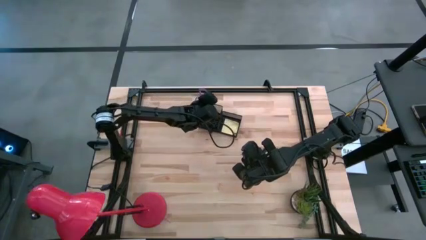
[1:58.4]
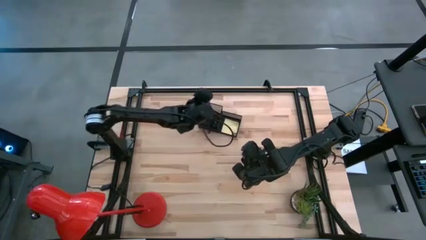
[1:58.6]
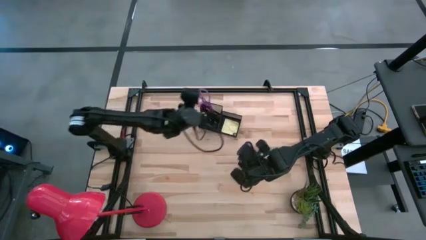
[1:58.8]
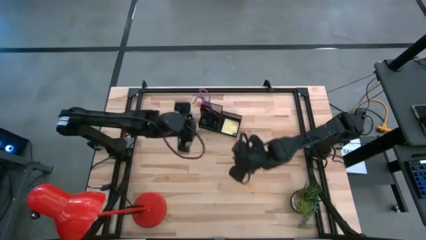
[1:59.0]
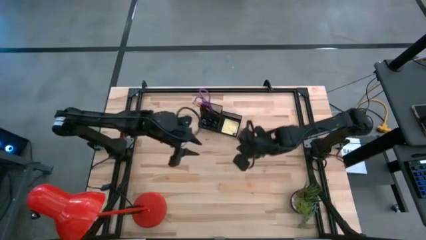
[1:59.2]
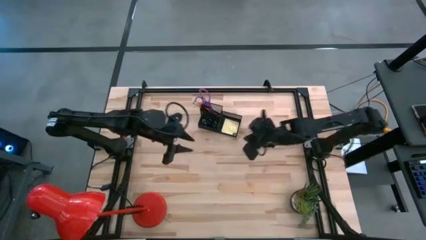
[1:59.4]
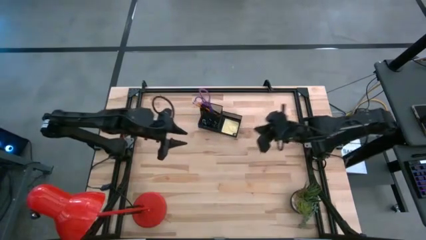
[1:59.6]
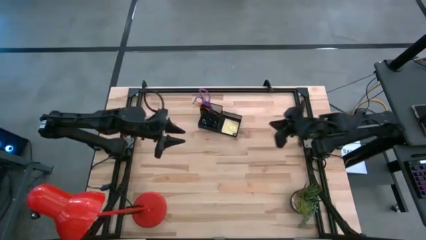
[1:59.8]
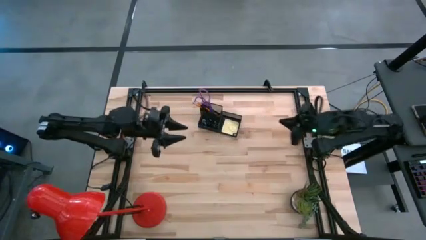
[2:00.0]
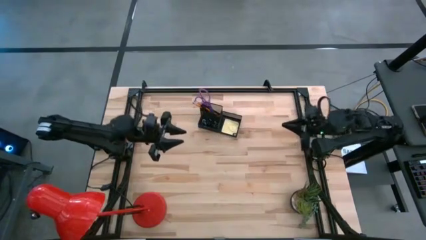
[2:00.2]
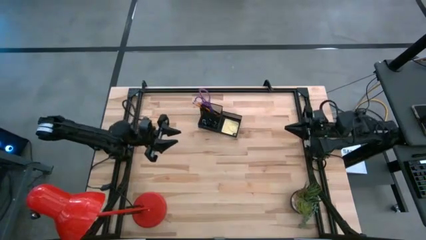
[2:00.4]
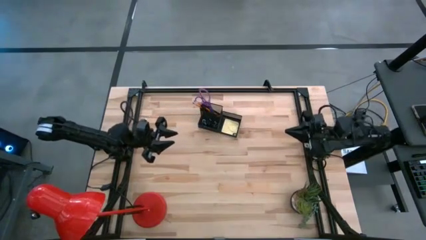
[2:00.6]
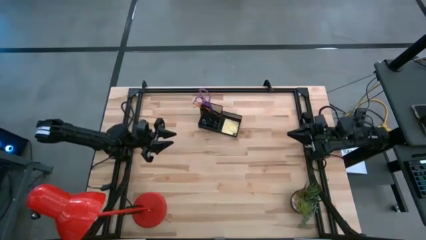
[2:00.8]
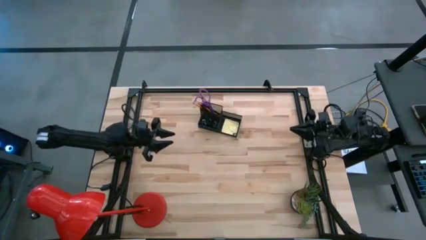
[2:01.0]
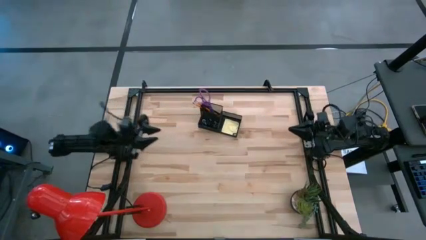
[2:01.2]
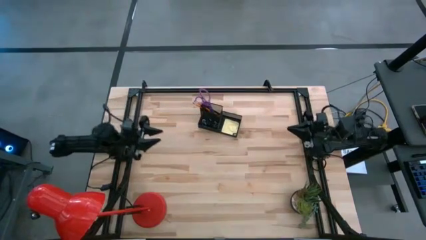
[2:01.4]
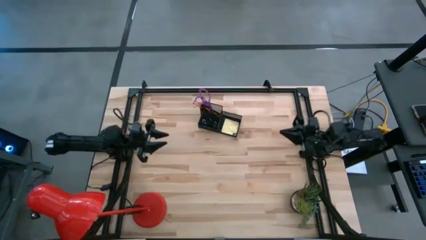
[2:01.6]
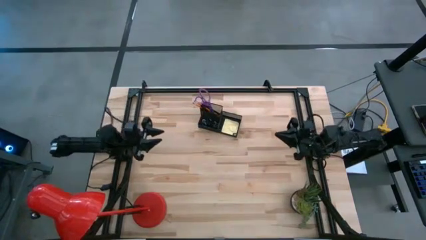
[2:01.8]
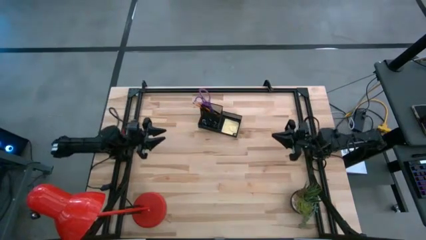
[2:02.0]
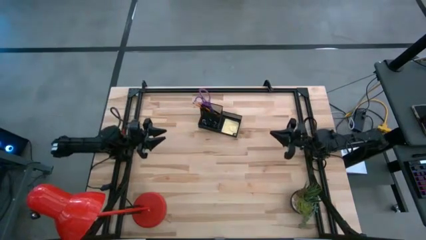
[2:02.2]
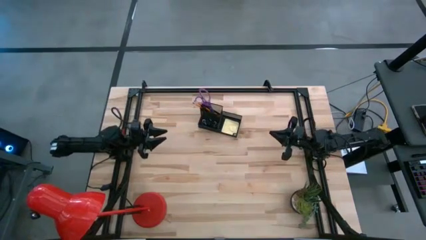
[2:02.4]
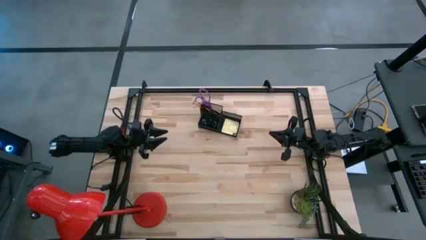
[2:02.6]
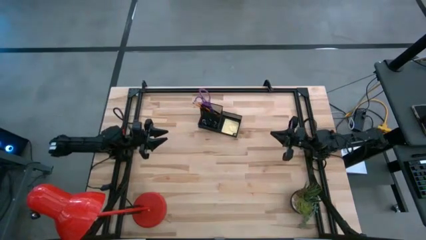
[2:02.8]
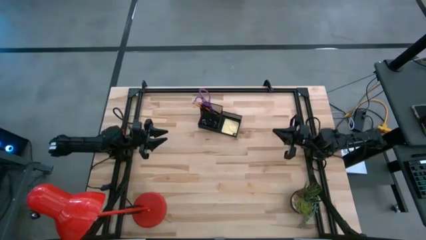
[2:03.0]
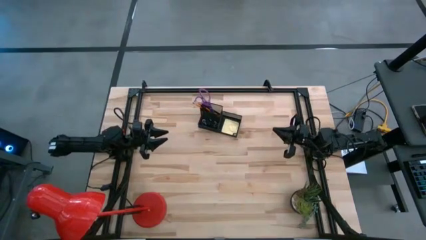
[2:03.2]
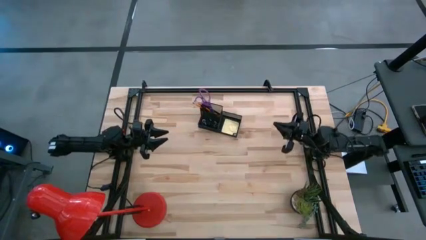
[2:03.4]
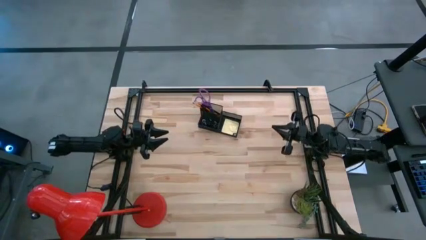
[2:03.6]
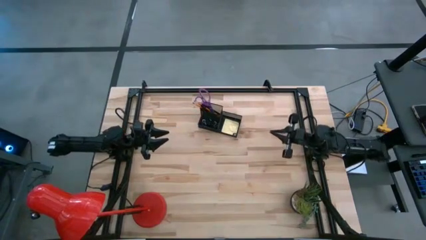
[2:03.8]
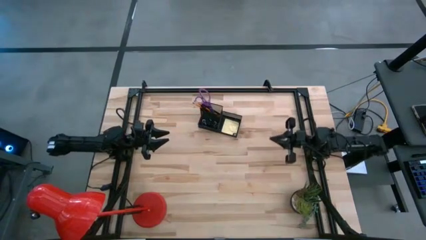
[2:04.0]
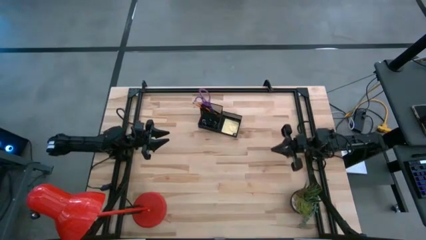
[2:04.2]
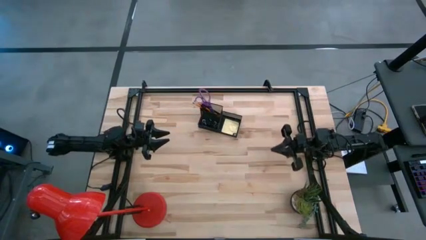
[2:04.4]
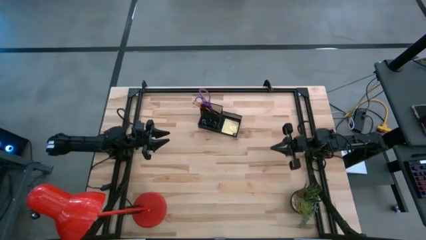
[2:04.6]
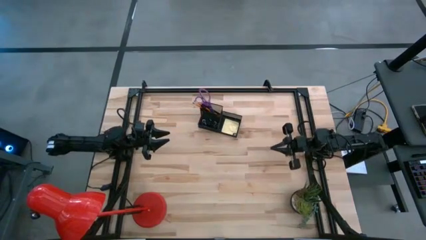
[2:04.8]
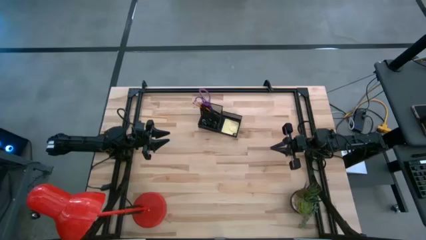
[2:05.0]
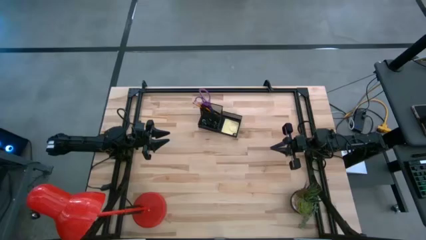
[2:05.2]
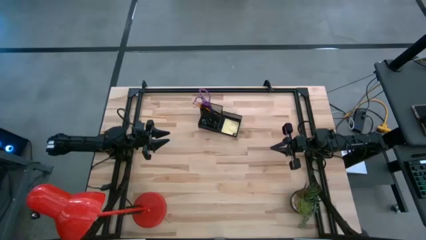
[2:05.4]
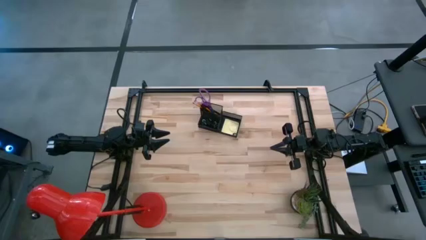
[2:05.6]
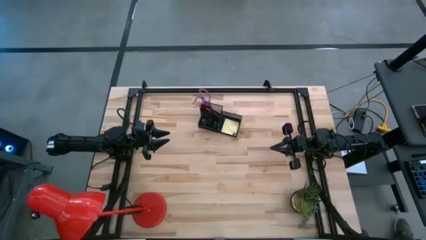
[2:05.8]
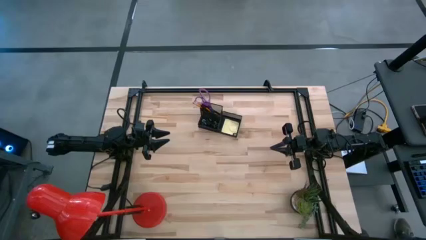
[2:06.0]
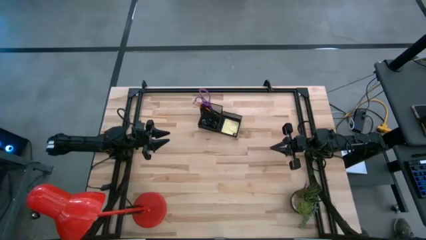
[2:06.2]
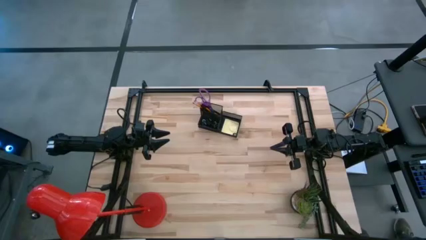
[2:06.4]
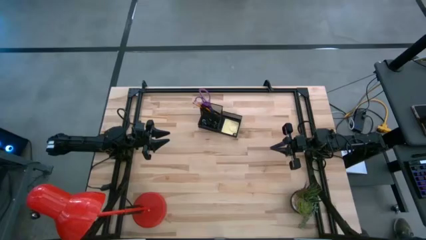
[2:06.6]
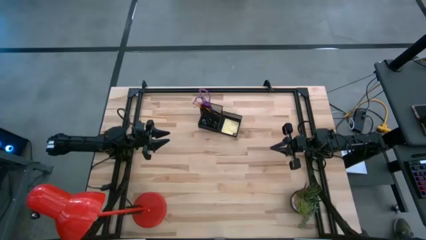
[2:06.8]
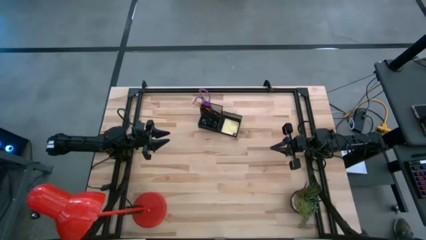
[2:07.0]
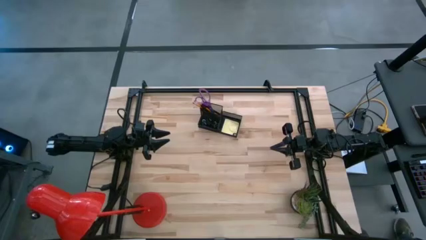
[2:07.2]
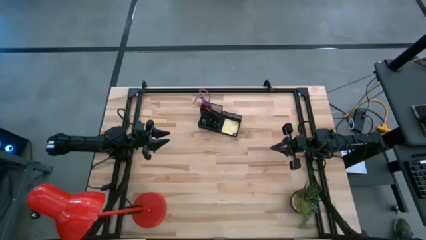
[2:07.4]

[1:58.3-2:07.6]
Task: Pick and place office supplies into organizer
Return to Home Position

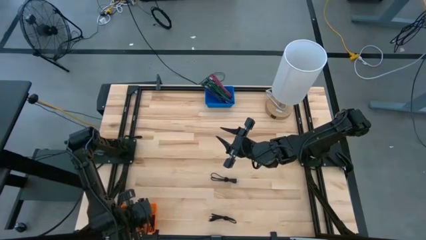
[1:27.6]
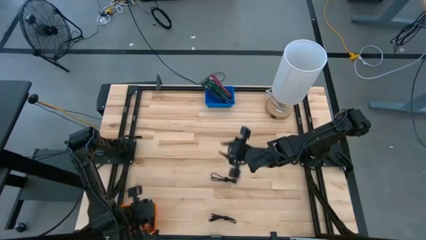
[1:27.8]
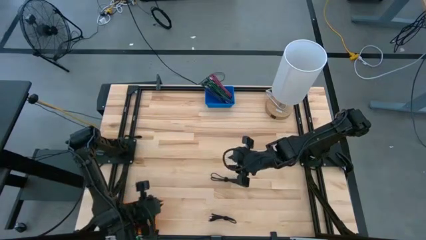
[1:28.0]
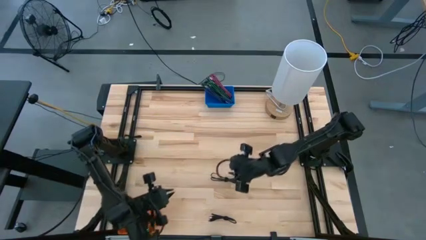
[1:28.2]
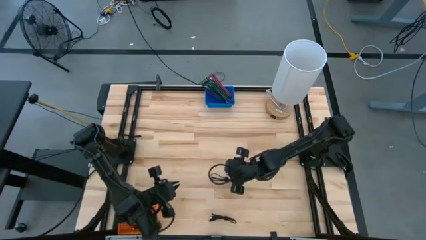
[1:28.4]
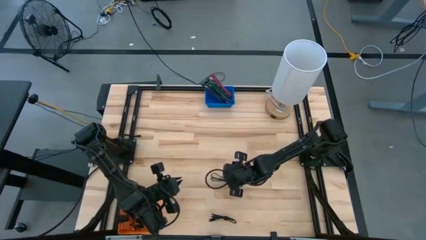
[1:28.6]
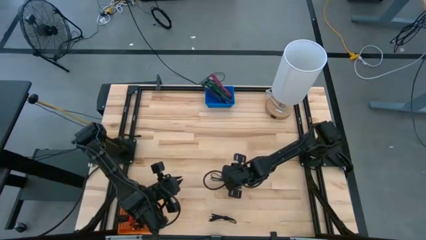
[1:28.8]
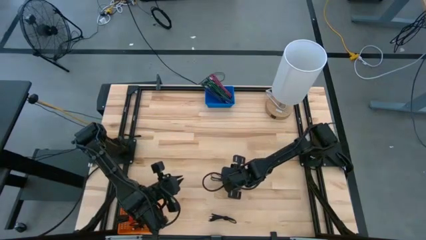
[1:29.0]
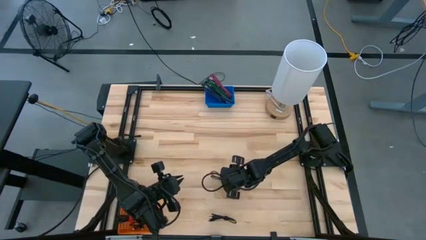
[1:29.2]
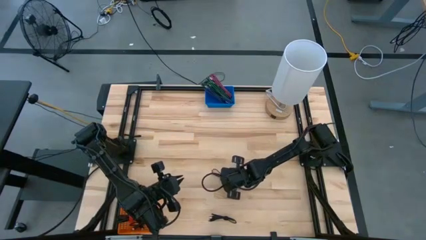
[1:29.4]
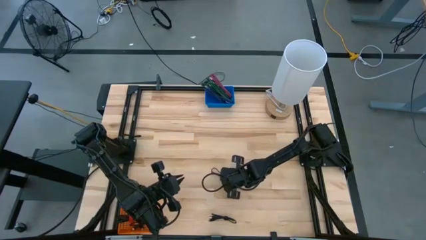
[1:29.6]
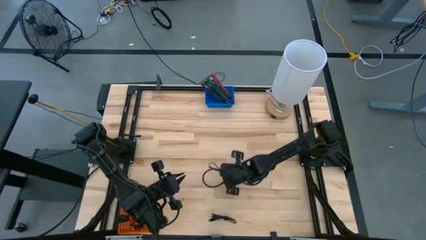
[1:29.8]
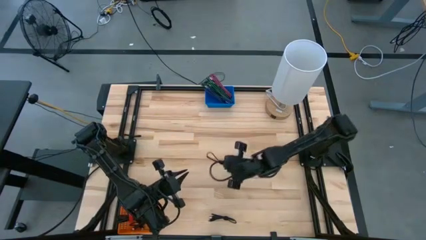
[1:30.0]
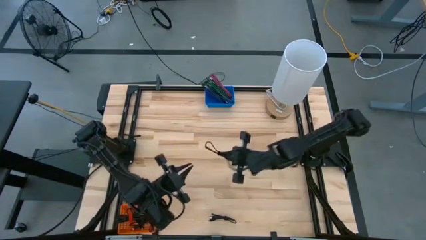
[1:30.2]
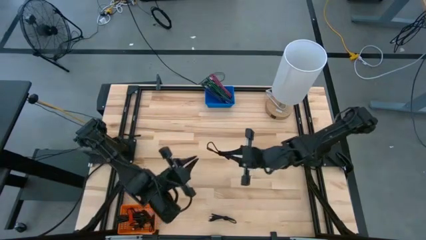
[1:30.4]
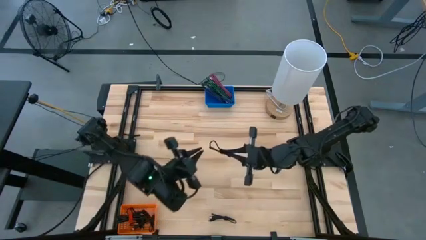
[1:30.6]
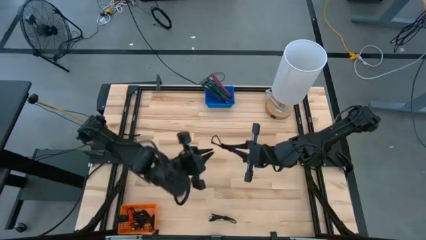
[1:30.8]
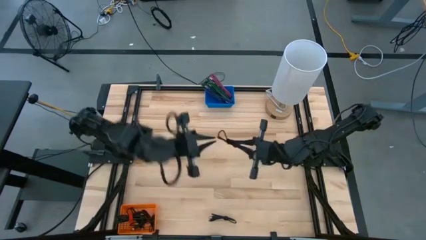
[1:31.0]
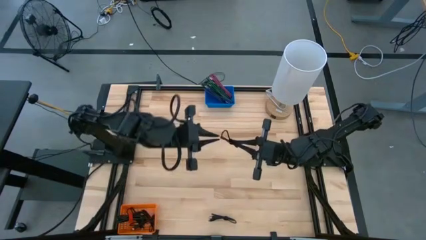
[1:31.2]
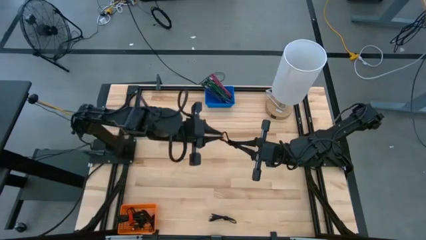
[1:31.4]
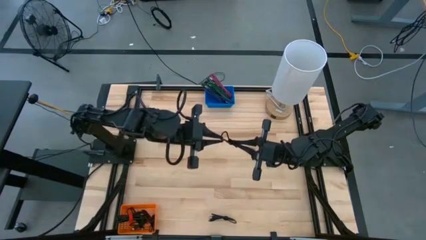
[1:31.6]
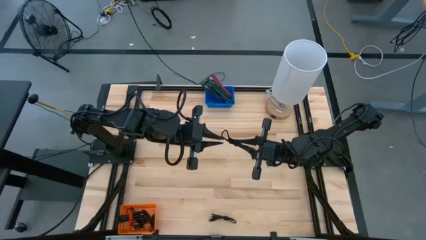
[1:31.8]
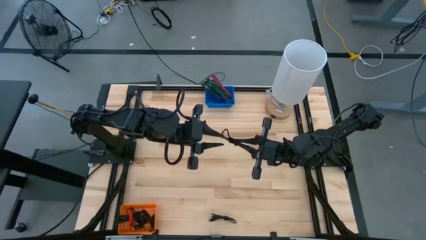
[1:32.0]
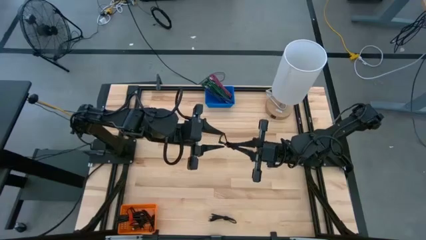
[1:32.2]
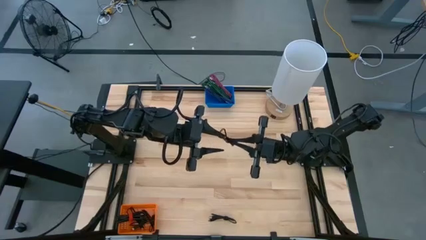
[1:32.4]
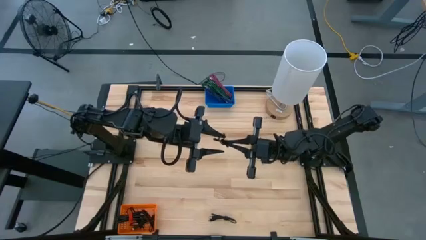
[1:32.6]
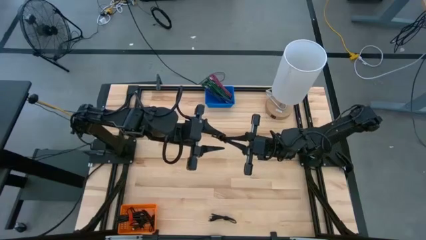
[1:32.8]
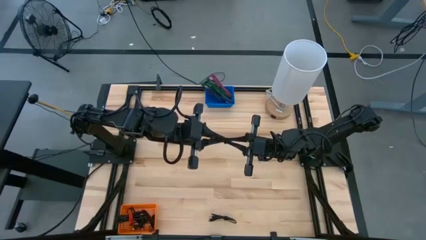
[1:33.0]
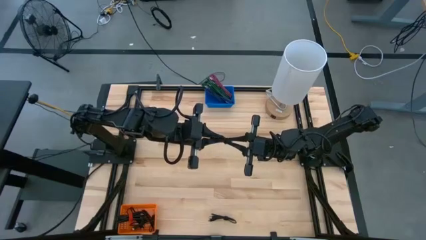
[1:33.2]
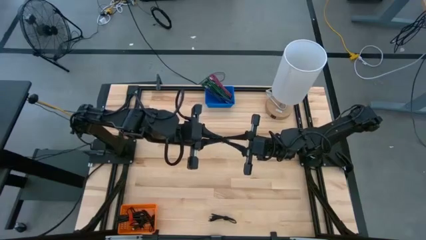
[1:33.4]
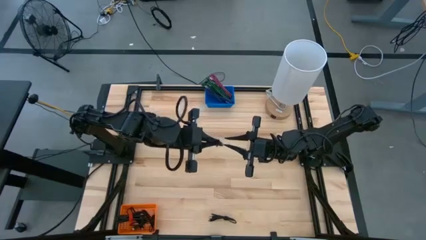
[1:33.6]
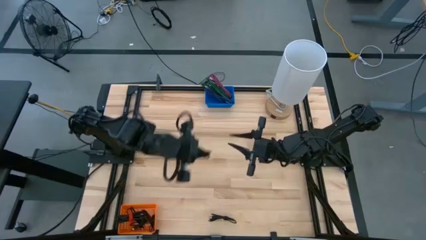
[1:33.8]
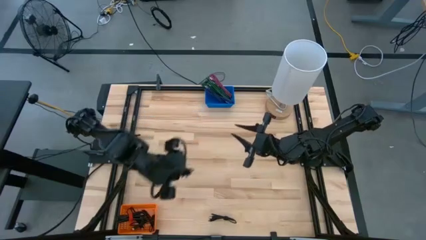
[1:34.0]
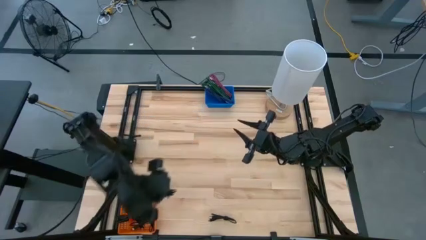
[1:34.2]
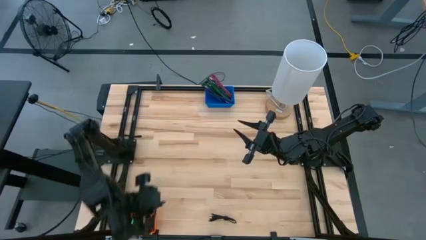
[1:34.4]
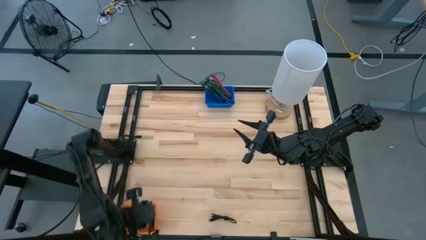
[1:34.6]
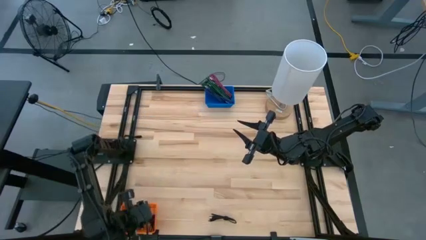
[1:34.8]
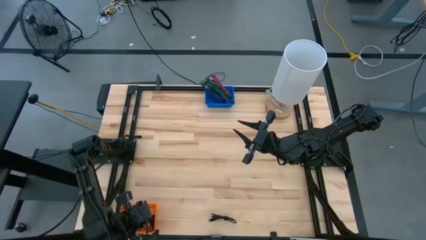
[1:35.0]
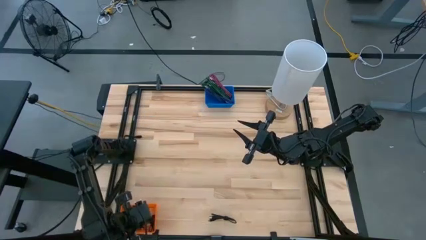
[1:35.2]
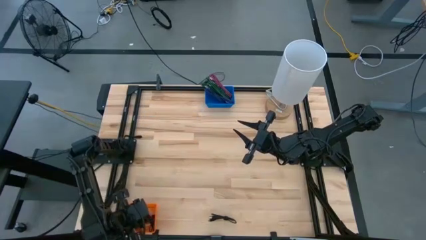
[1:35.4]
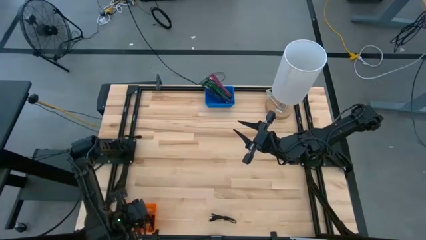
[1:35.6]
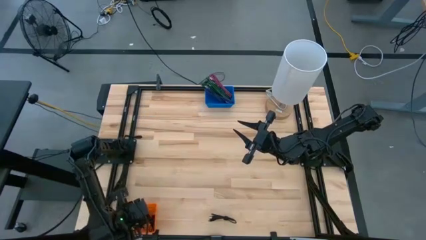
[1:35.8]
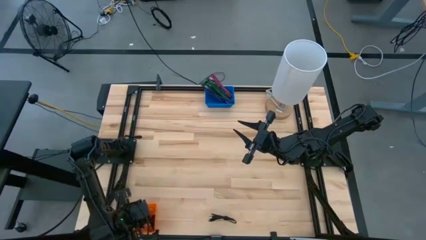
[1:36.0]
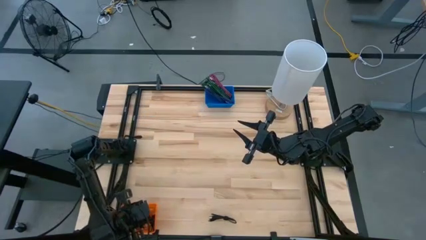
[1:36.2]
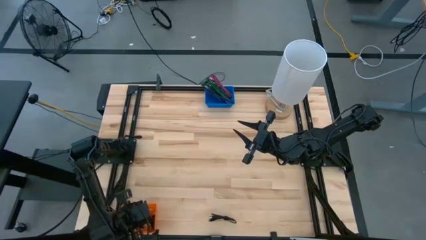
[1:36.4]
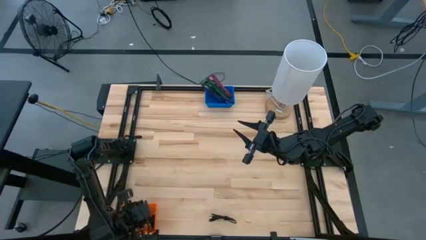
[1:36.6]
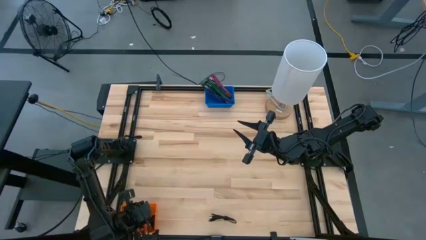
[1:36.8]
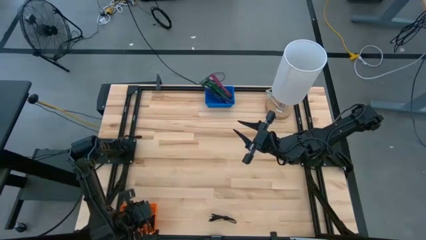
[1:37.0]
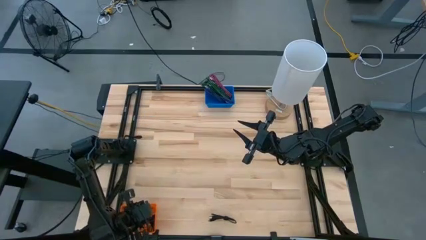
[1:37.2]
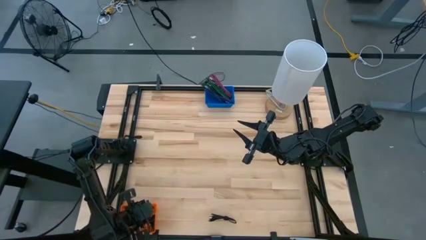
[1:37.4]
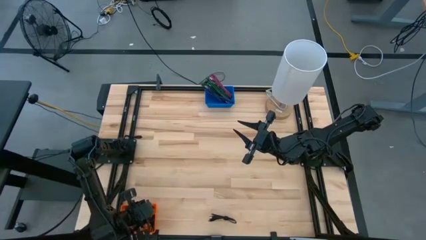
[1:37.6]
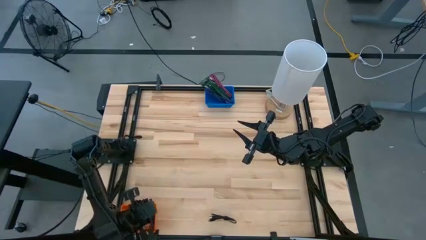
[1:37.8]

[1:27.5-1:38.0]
Task: Pick & Place USB Port
Put the black charger cable into the orange basket
